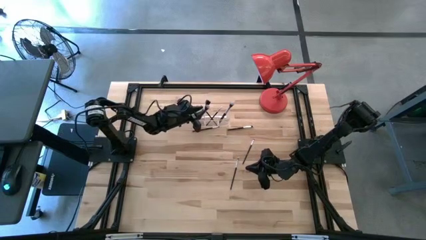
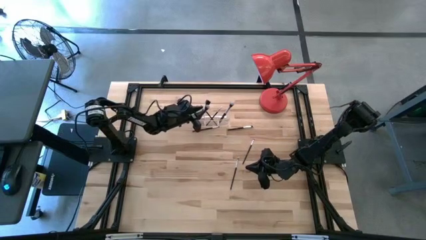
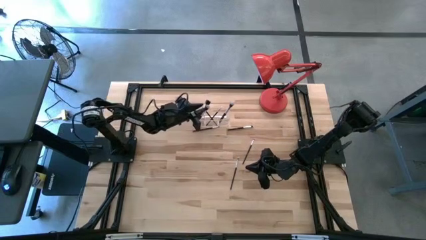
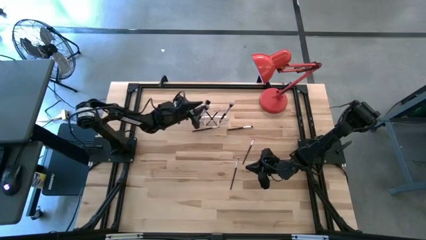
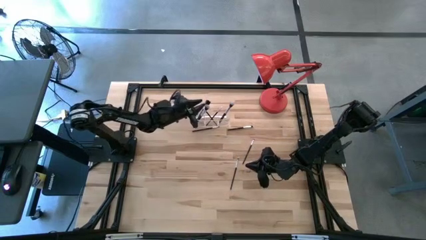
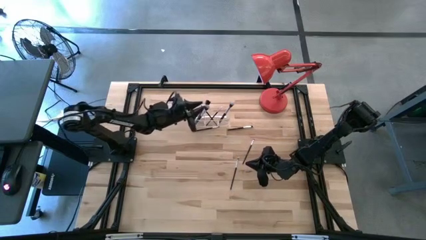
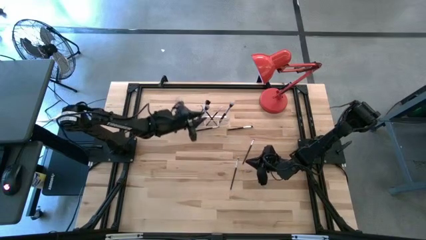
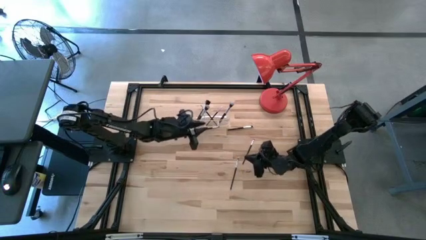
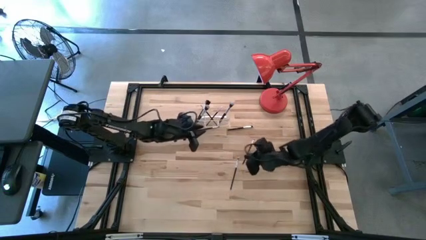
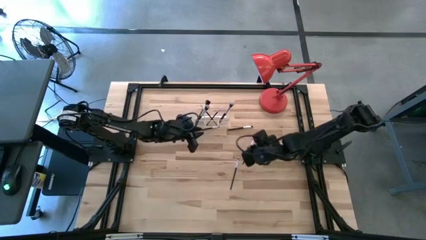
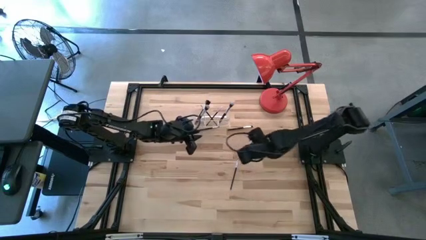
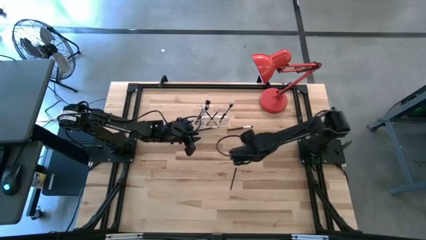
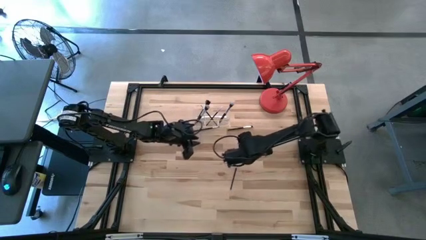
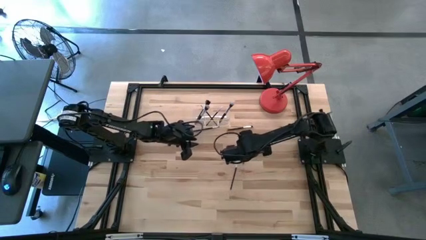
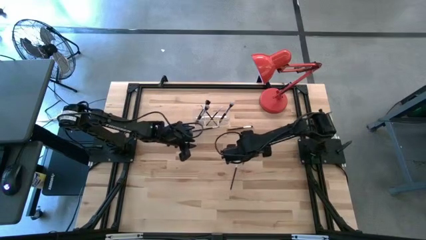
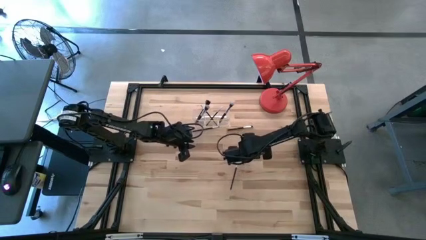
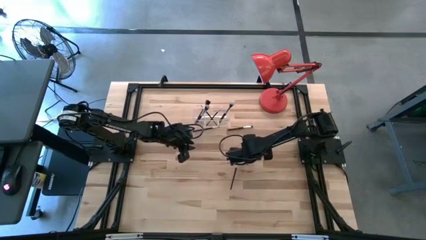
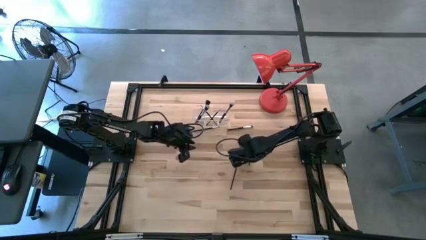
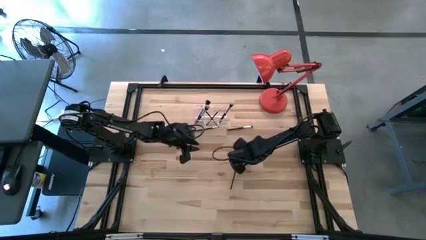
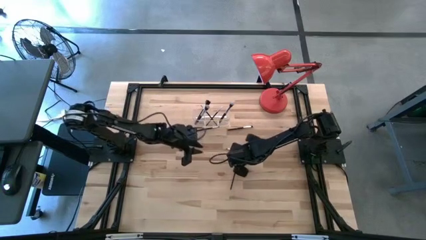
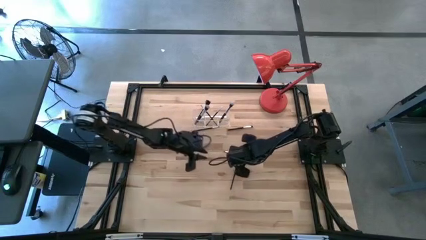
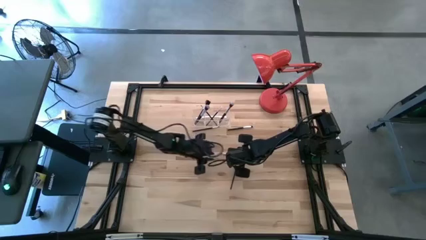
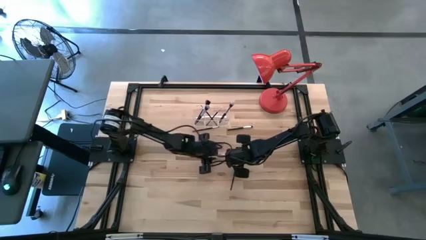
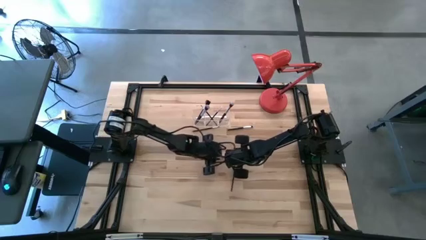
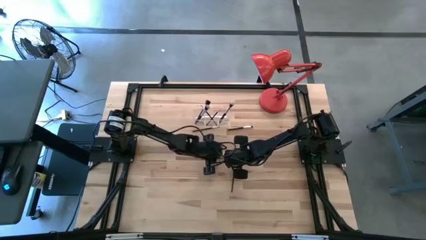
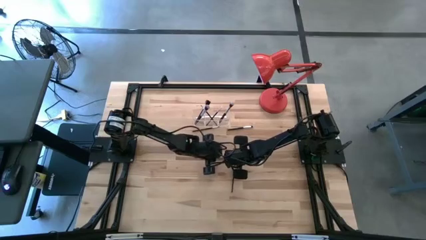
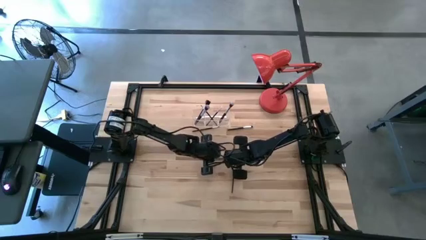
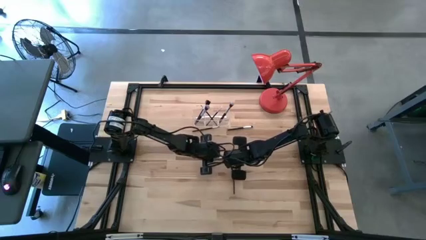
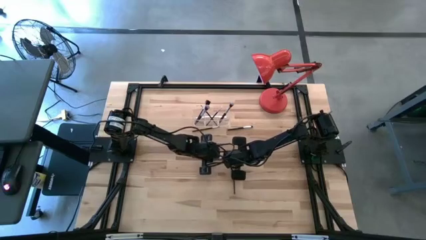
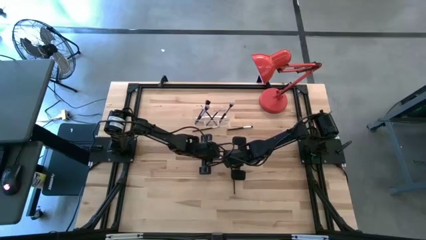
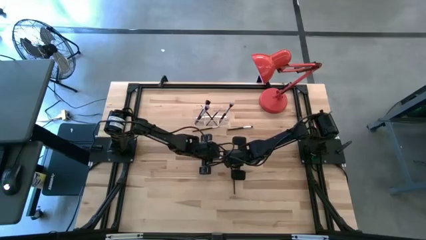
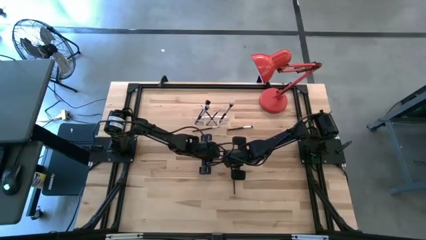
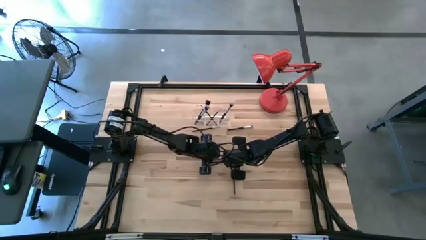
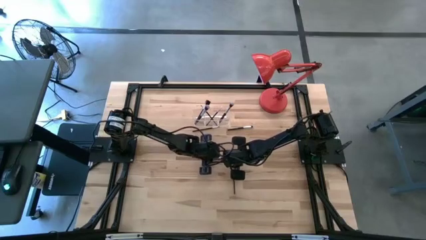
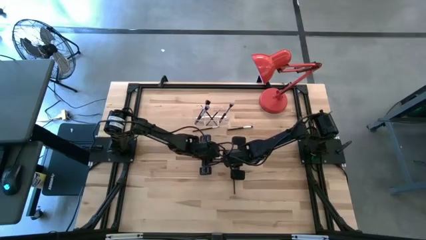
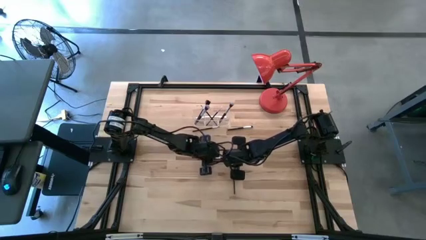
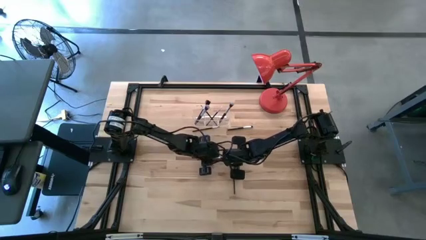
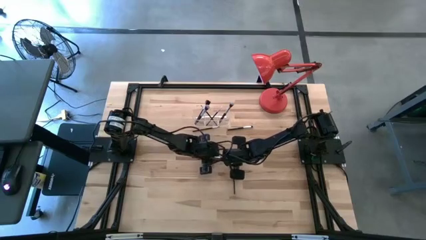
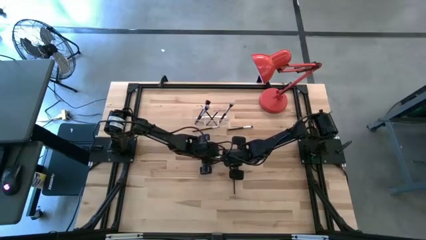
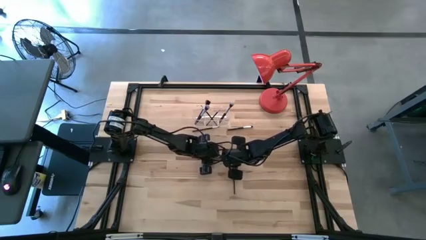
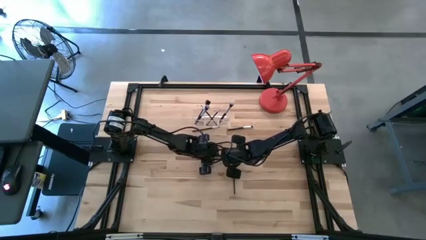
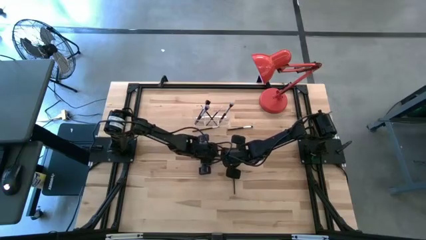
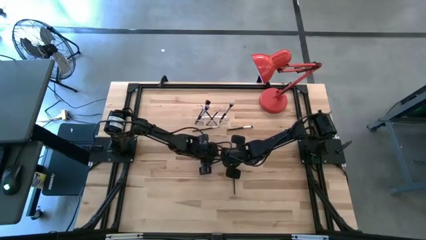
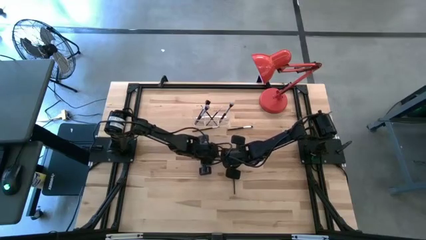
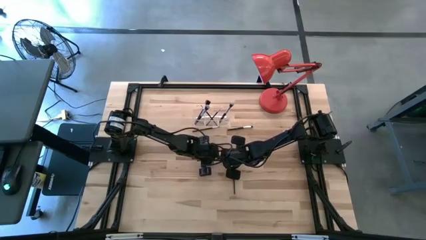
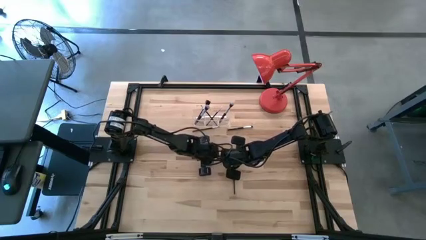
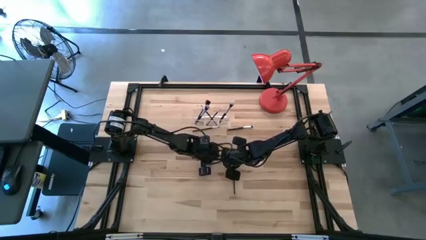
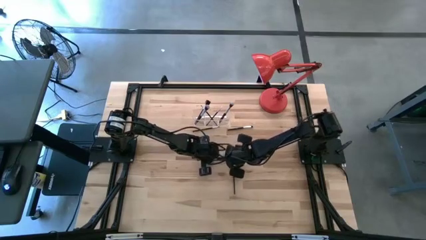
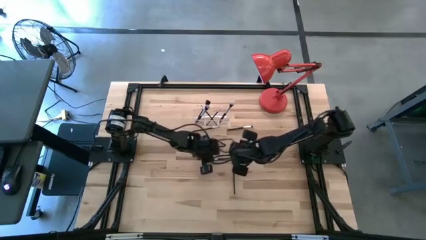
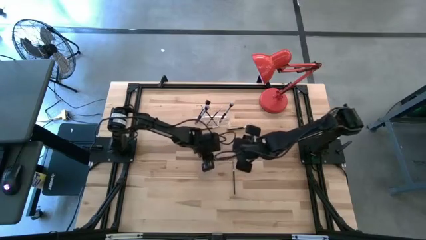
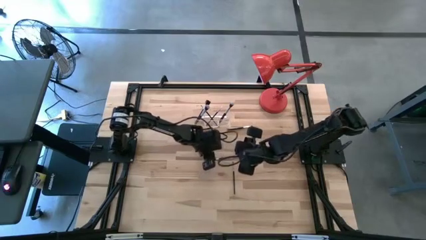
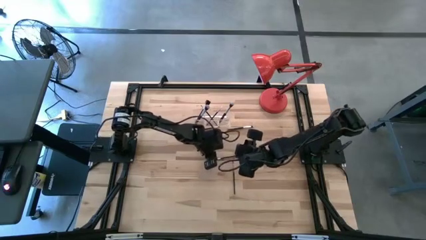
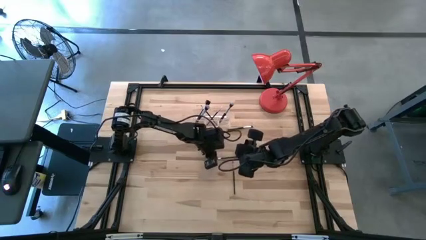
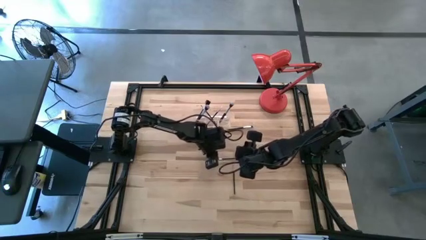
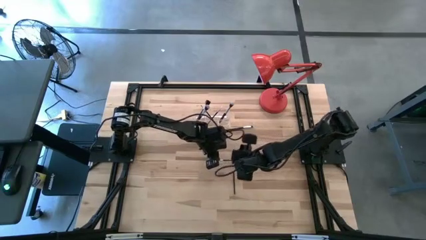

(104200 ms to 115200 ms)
Task: Put items in baskets/containers
Put the black eyeshadow brush into the transparent organizer

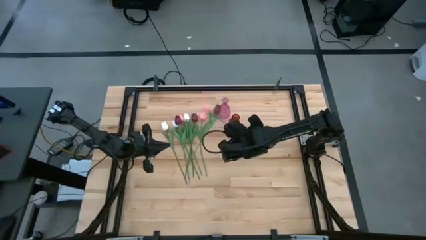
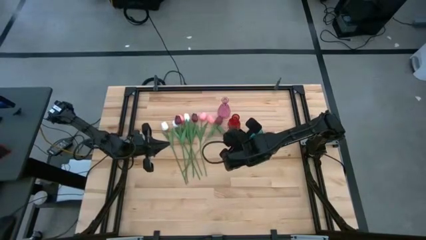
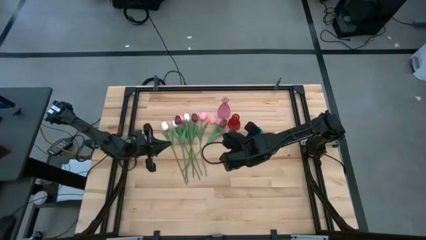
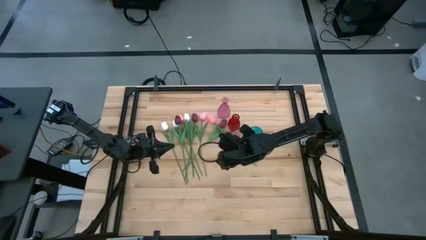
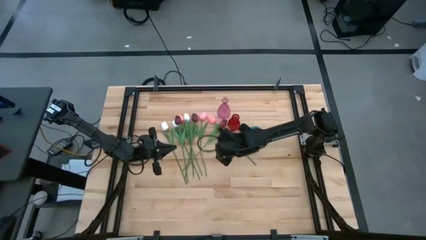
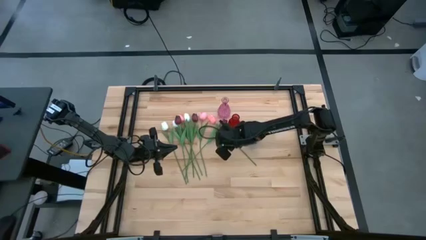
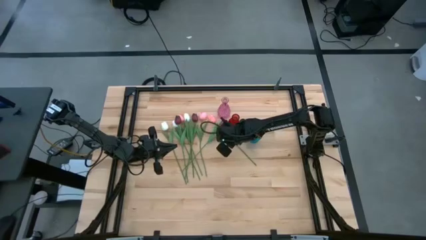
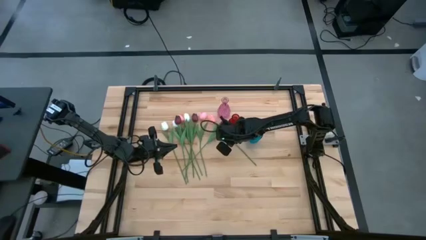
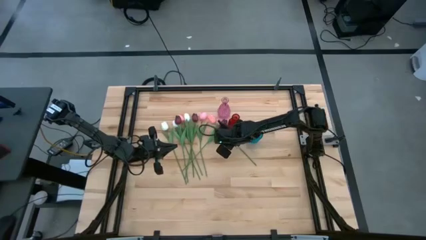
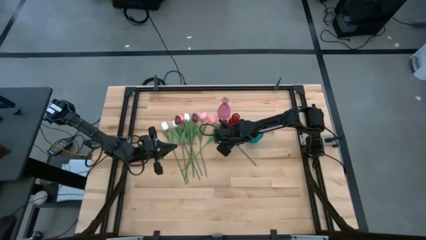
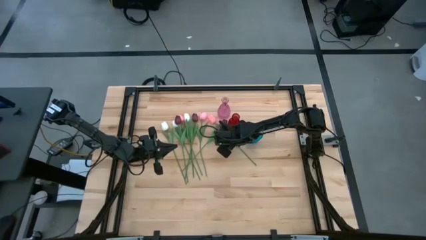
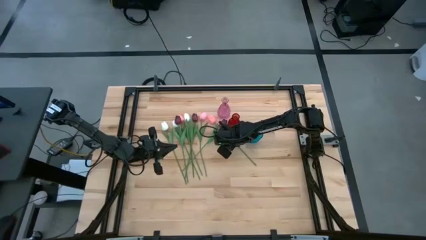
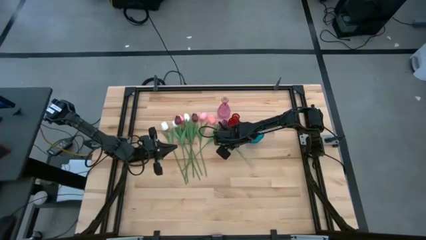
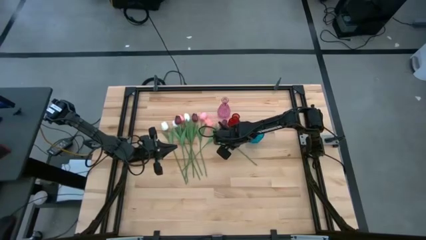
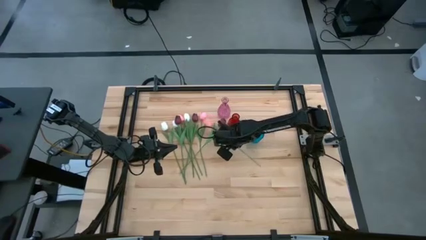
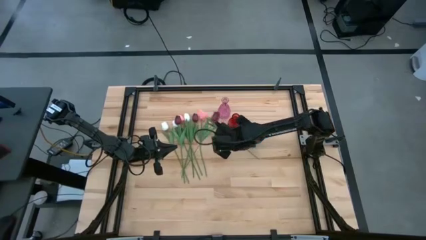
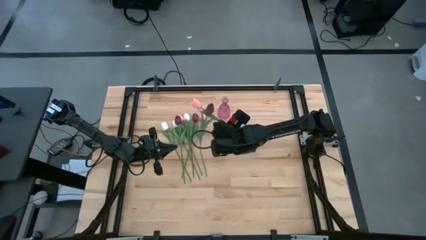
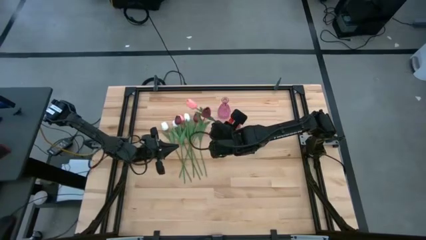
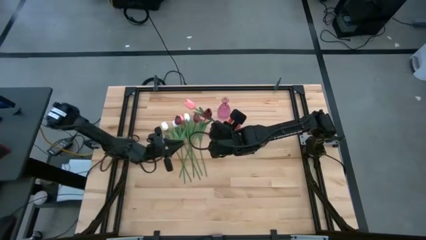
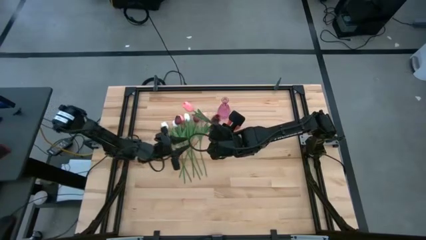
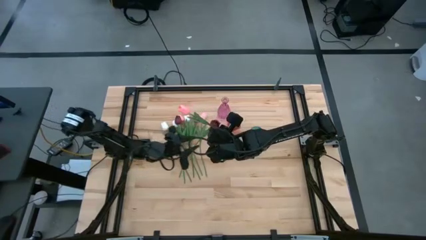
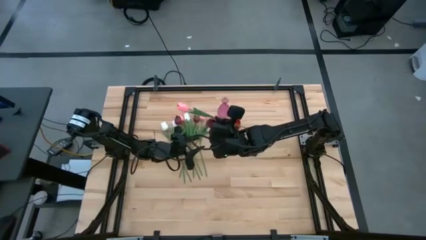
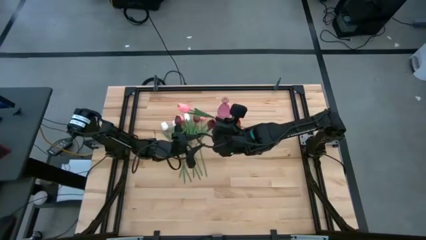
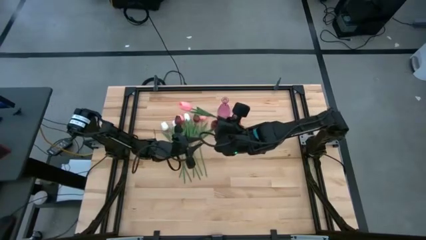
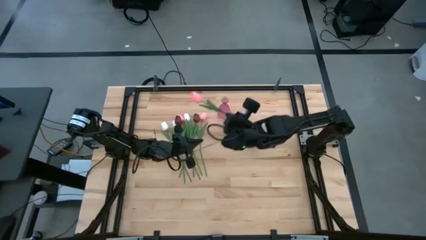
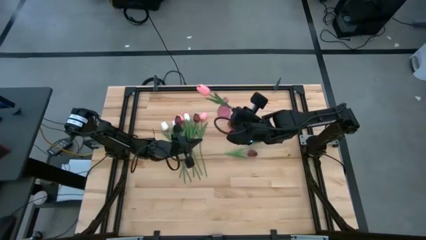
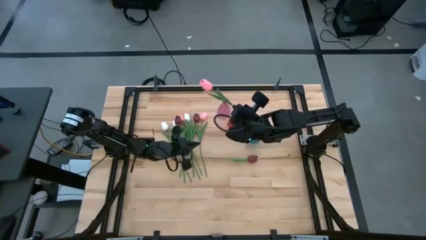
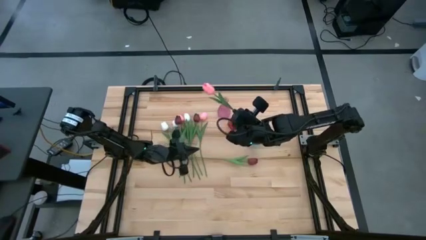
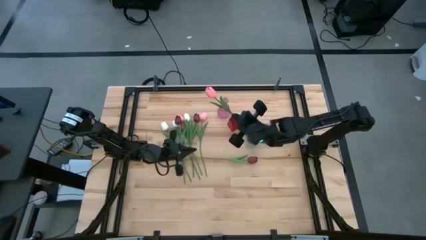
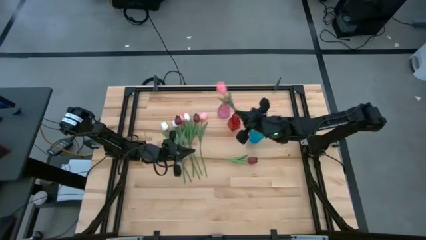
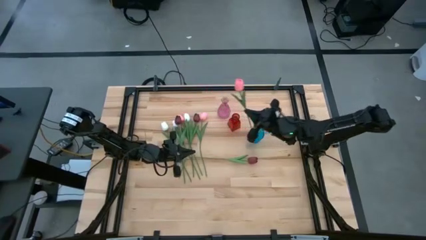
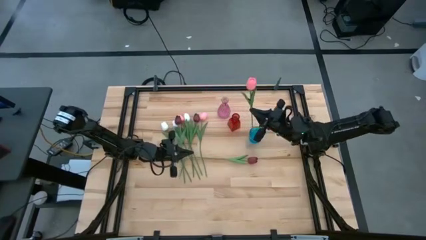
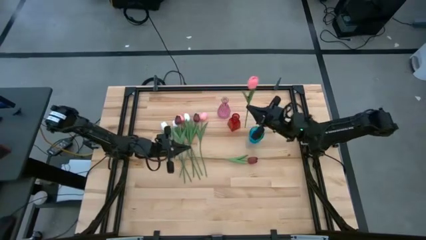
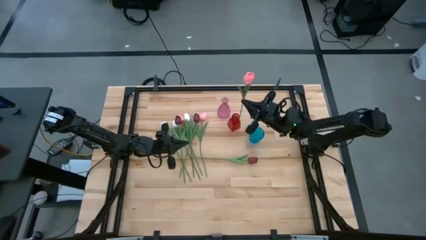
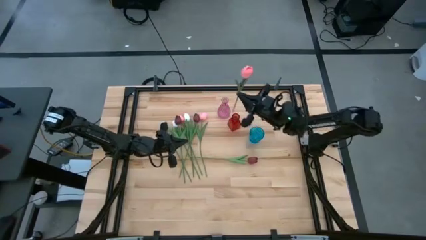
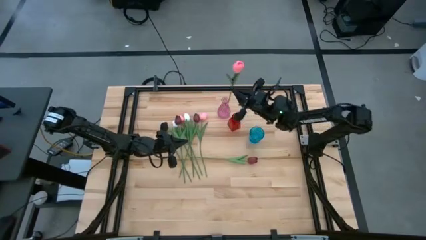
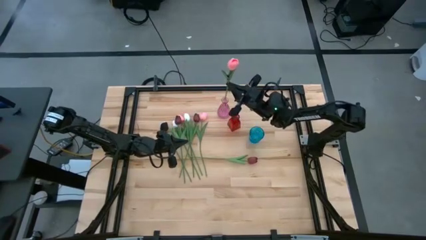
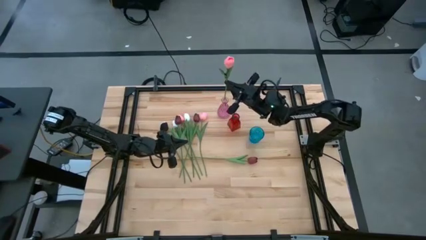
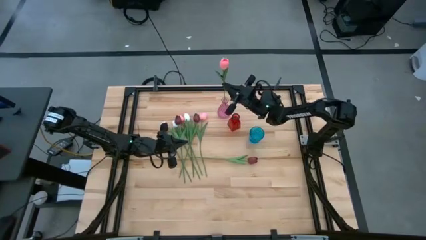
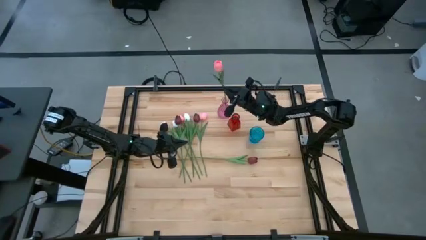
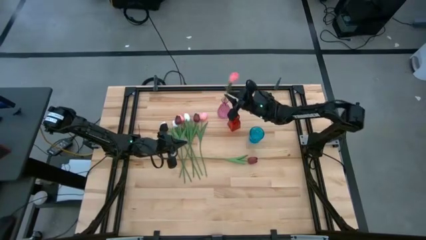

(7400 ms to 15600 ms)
Task: Sort flowers into vase by color
Put the pink flower into the pink vase
